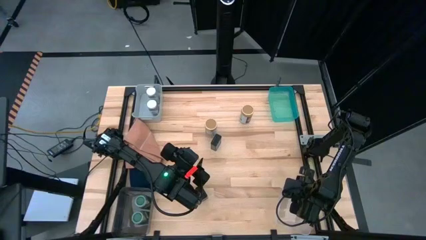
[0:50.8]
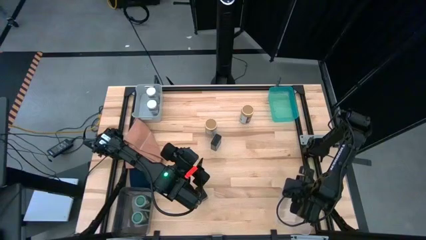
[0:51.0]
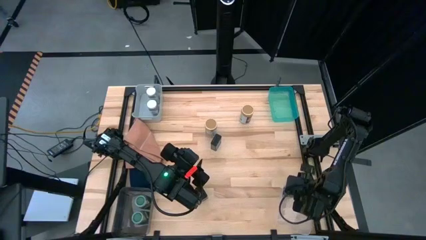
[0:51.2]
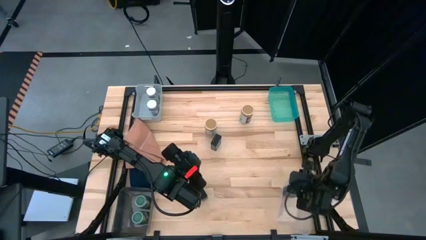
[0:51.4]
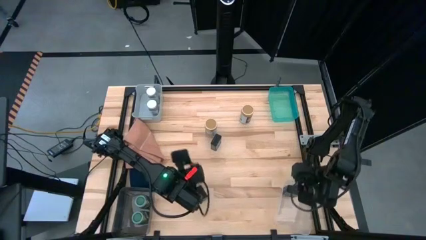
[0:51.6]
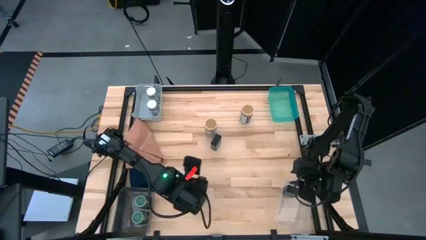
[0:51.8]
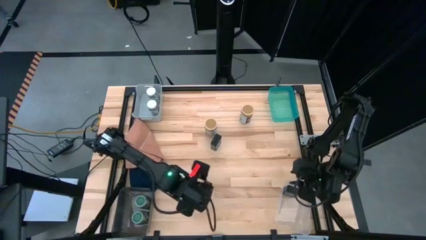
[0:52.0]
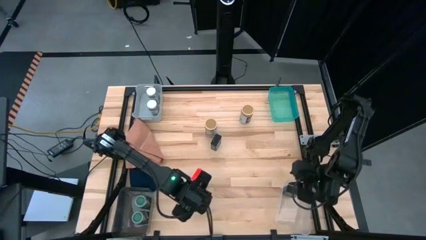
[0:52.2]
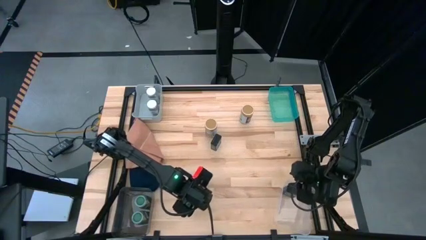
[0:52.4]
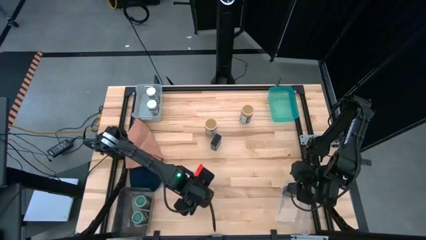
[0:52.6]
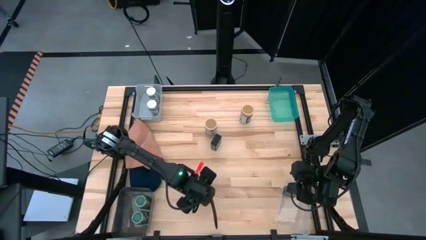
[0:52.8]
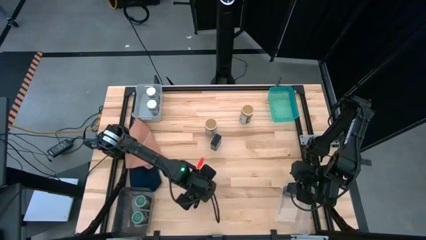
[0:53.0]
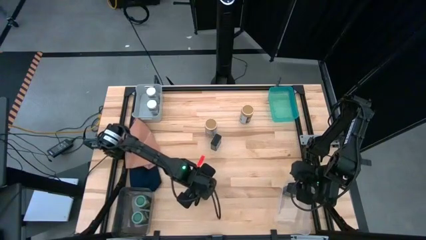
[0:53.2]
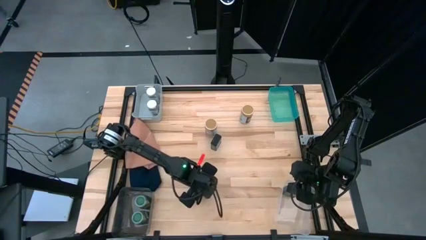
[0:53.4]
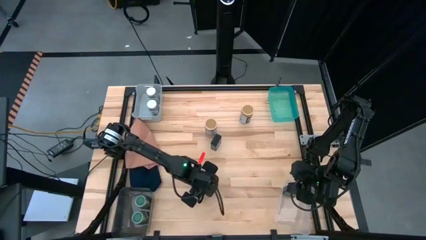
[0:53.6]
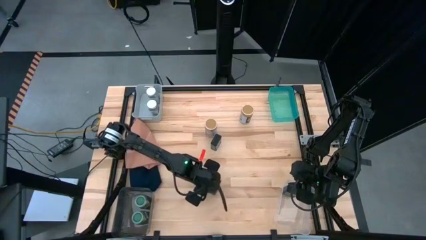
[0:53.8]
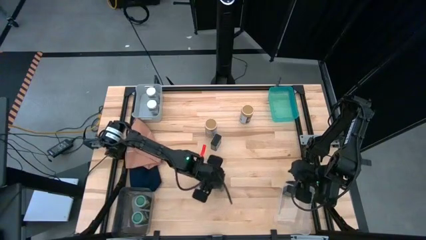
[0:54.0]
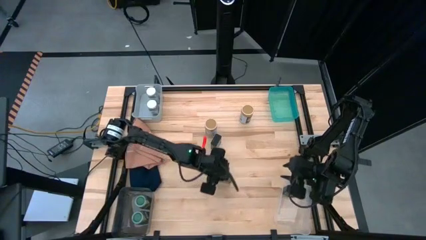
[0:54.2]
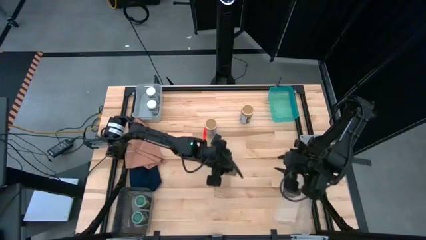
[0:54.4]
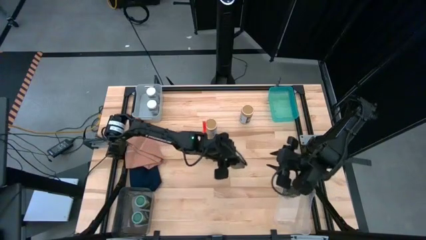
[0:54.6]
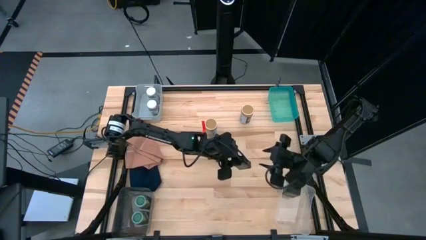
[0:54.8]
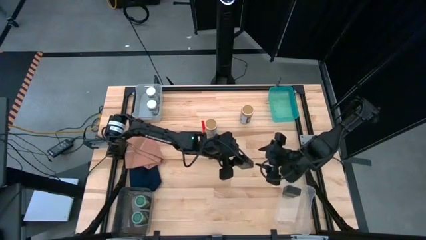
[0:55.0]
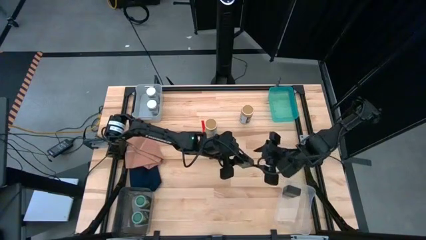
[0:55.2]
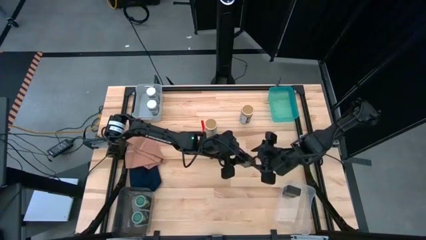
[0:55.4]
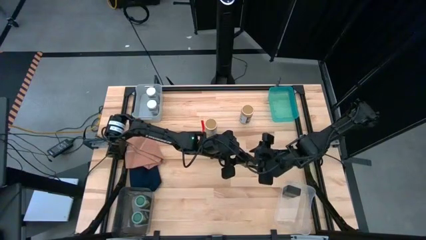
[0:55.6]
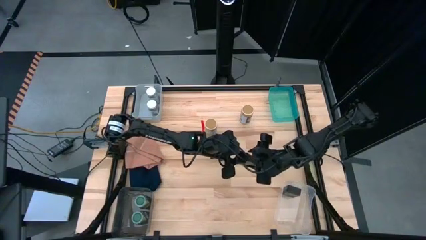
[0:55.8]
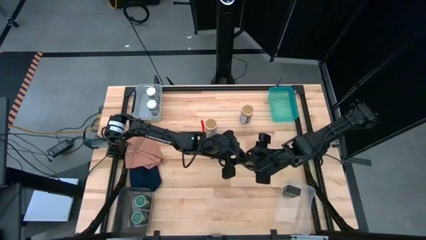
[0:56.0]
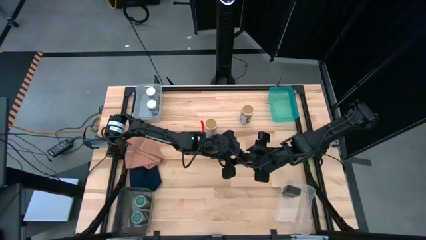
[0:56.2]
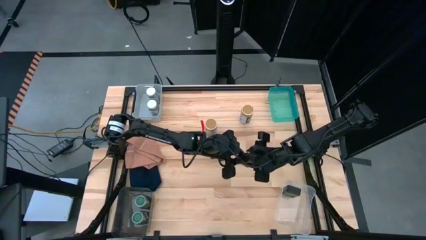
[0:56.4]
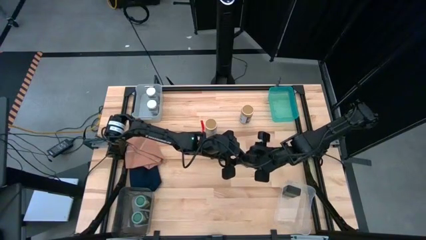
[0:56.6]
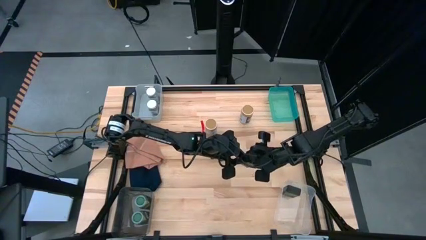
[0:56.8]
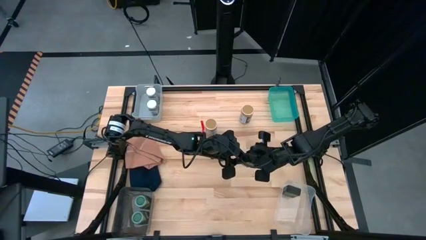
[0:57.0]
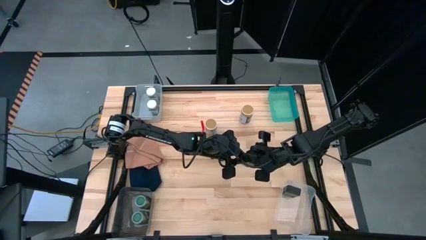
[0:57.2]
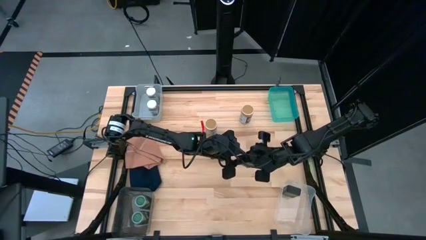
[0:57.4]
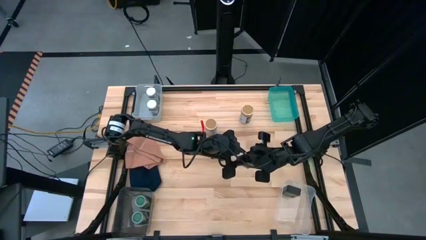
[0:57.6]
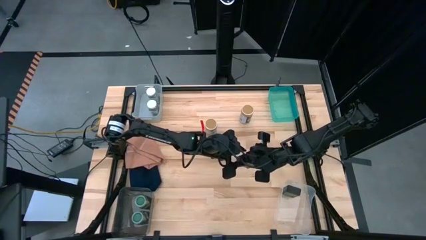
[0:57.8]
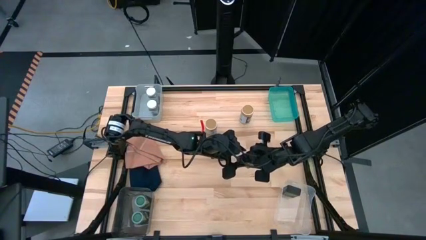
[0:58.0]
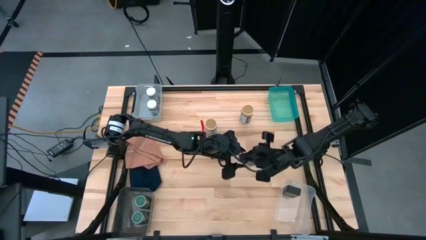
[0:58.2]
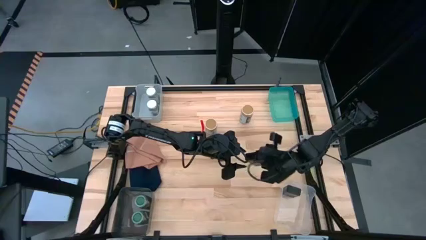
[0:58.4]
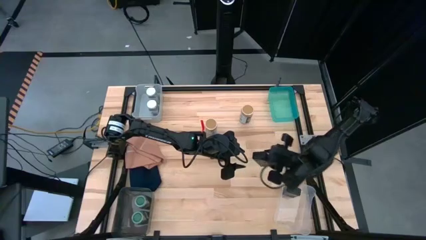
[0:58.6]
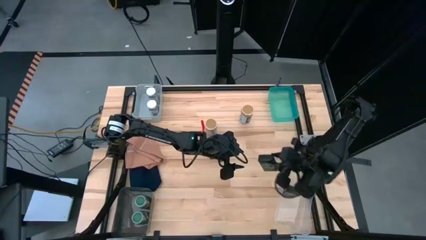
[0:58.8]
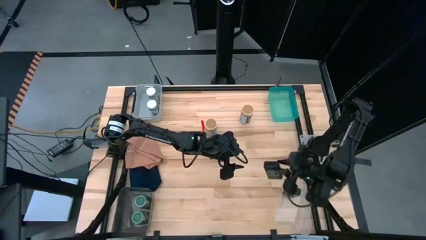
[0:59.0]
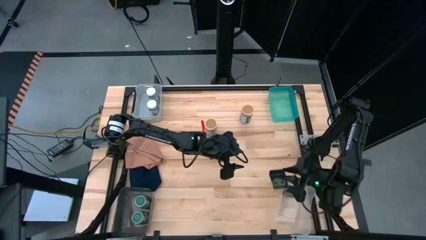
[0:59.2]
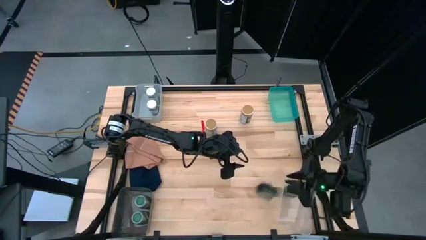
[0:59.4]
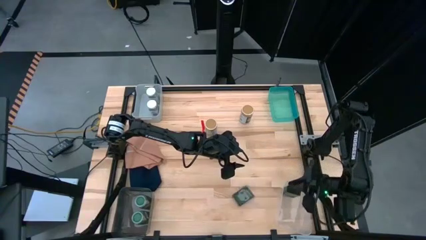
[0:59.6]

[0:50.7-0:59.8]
Task: Sort spices by type
Put bottom black spice can into the transparent bin

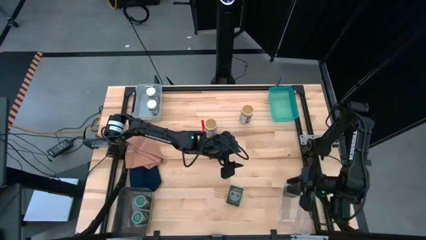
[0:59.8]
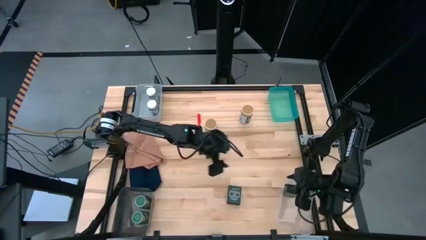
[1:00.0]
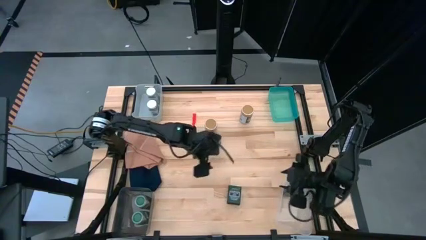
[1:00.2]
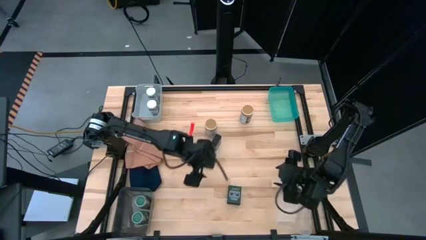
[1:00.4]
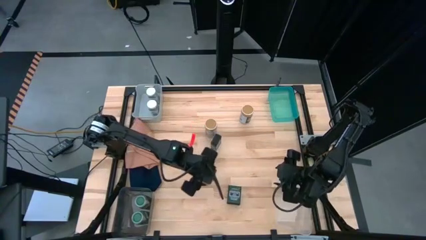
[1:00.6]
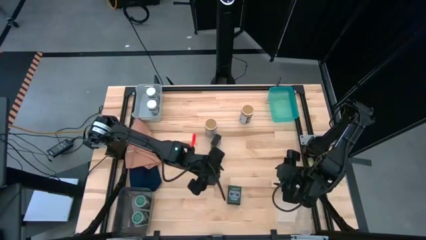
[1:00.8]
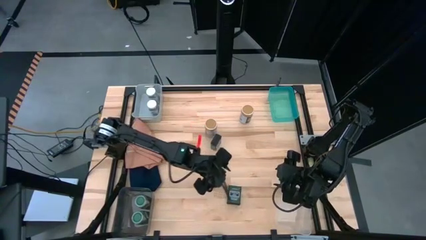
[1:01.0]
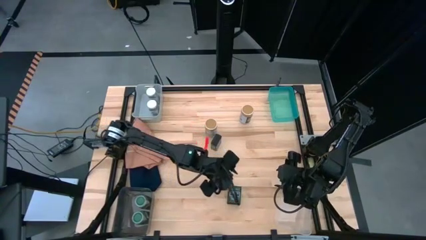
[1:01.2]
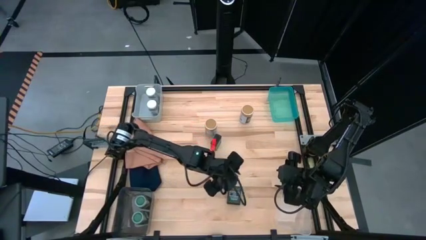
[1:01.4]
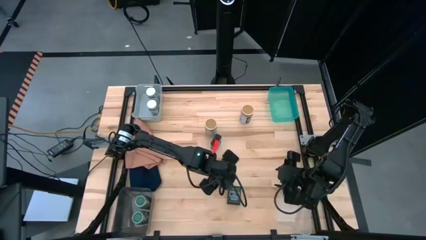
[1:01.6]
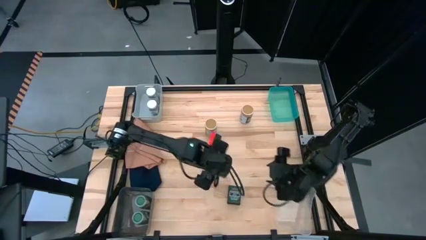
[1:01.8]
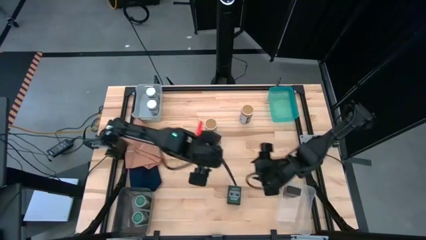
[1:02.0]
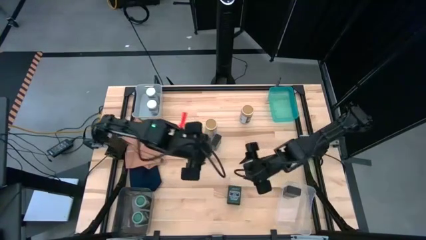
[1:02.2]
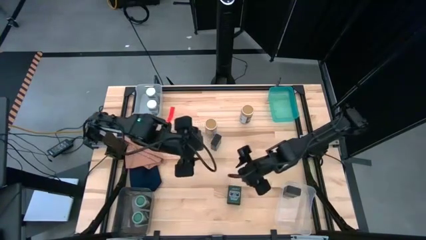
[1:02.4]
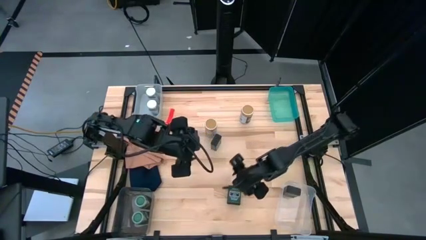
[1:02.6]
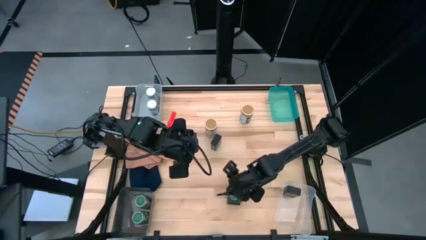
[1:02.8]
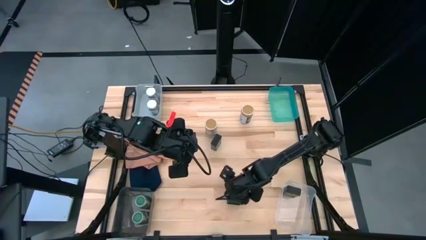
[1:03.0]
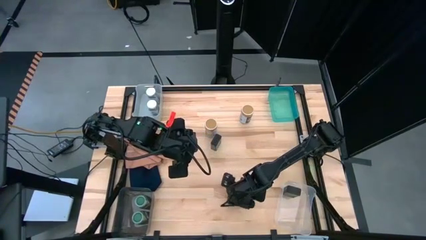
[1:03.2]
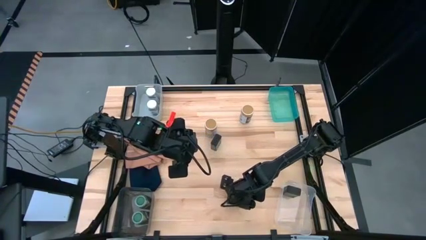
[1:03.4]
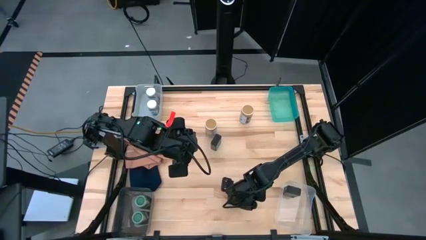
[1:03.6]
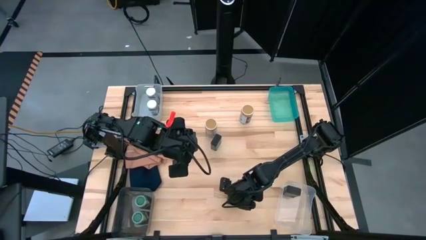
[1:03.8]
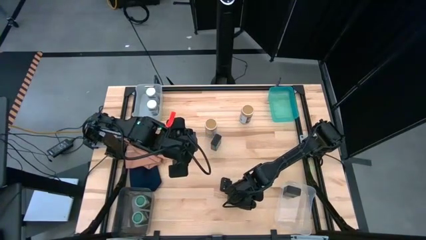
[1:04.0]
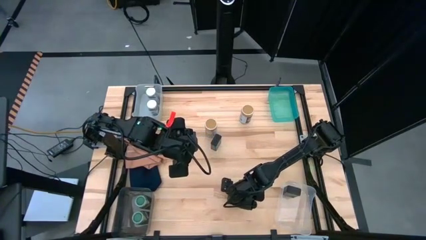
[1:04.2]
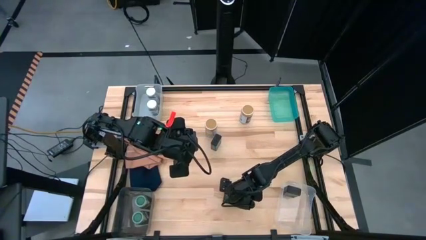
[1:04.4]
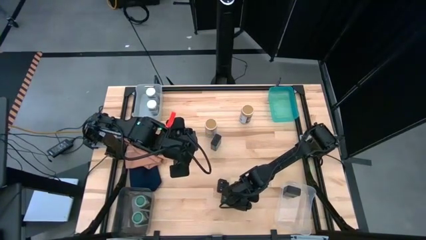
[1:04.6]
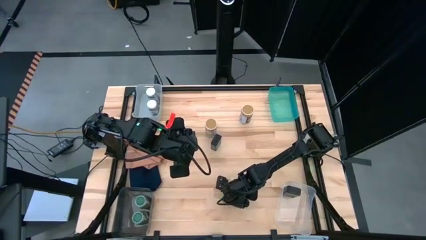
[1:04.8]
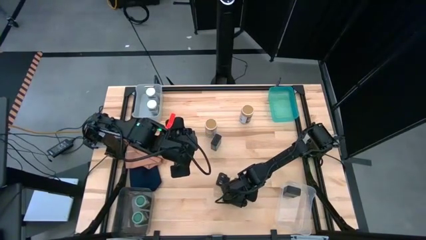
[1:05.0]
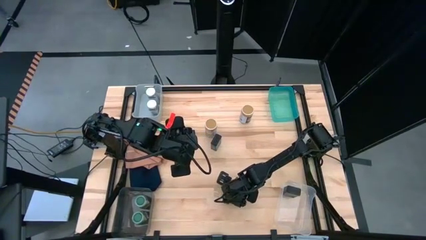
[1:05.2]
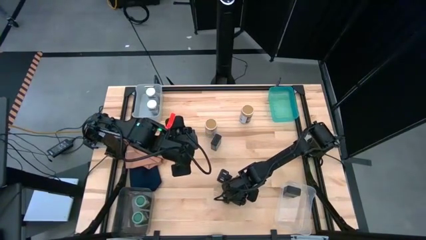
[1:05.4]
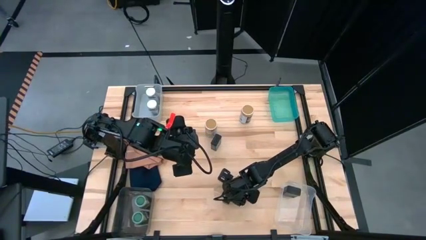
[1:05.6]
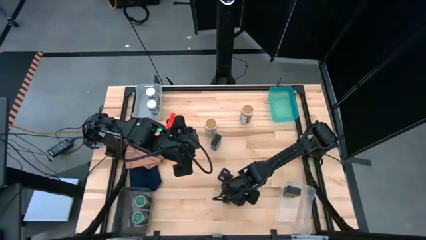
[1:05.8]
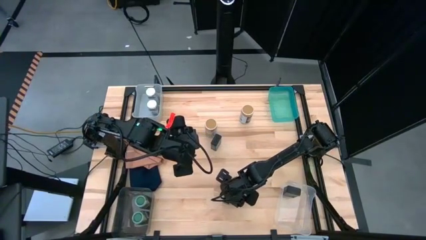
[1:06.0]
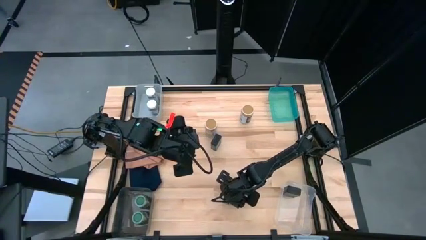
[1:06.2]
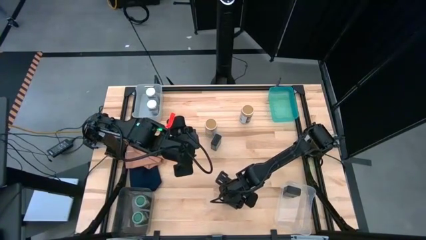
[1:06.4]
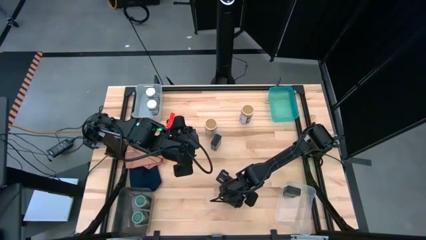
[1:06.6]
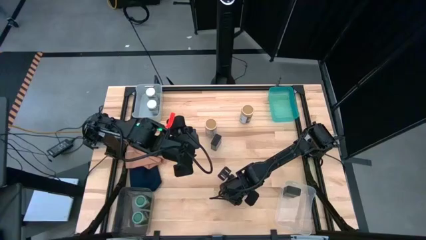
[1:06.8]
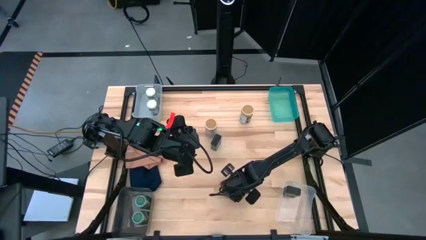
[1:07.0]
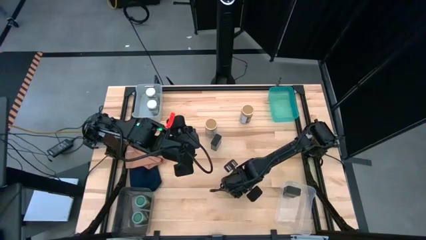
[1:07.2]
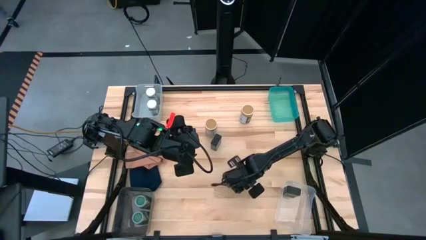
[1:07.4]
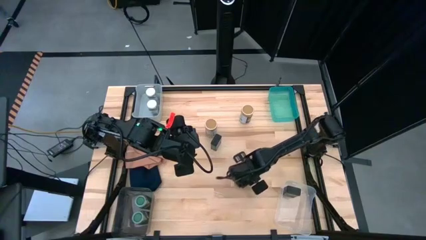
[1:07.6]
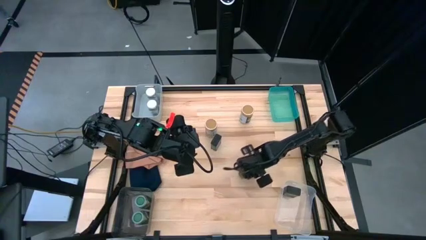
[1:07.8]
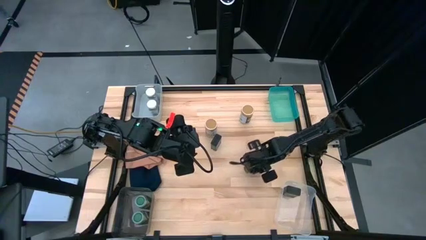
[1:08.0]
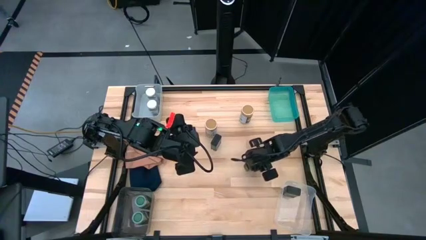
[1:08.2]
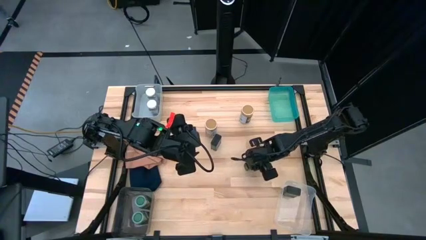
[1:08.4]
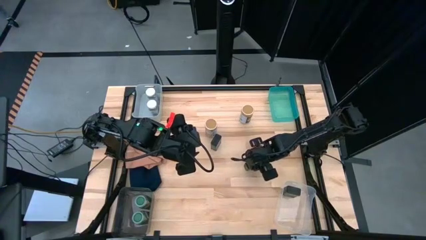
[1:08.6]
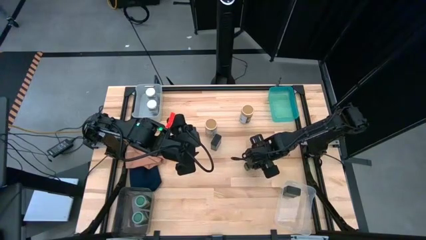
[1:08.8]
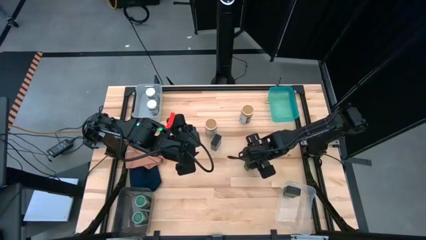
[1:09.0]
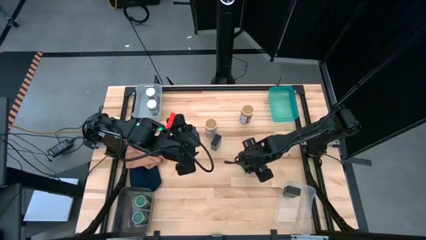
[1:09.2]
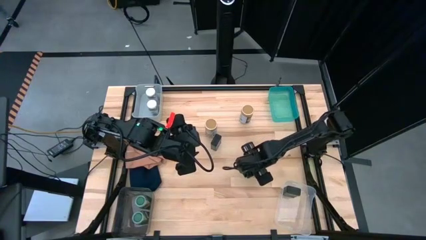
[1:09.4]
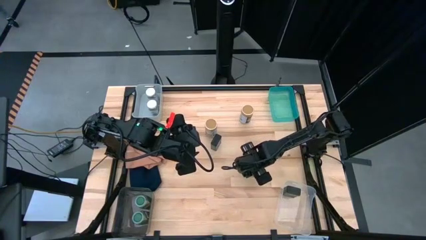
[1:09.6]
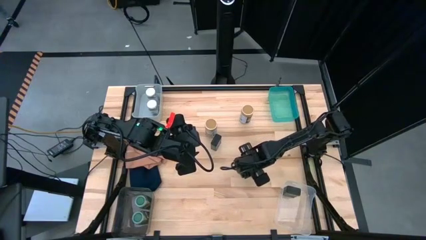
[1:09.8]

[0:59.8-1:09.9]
Put bottom black spice can into the transparent bin
